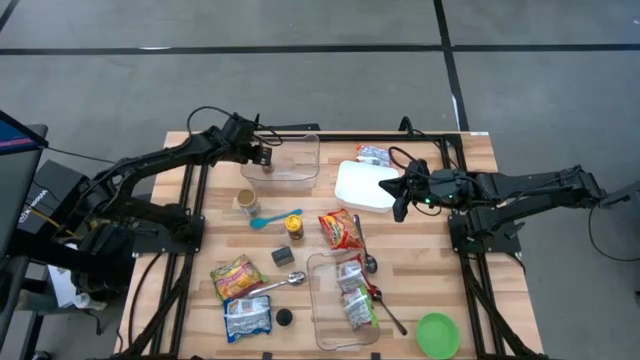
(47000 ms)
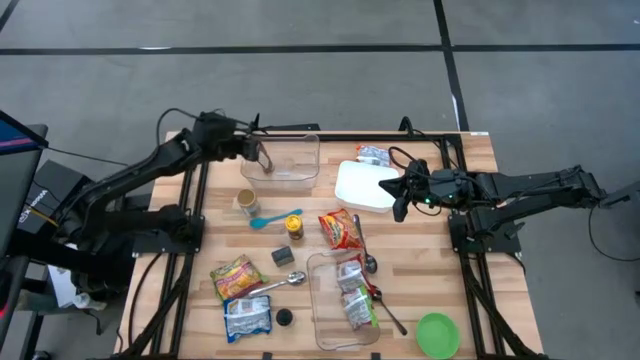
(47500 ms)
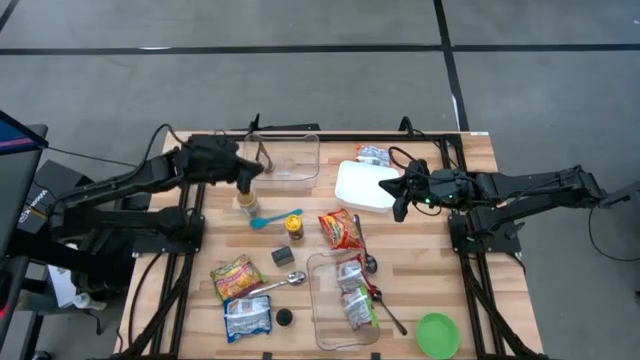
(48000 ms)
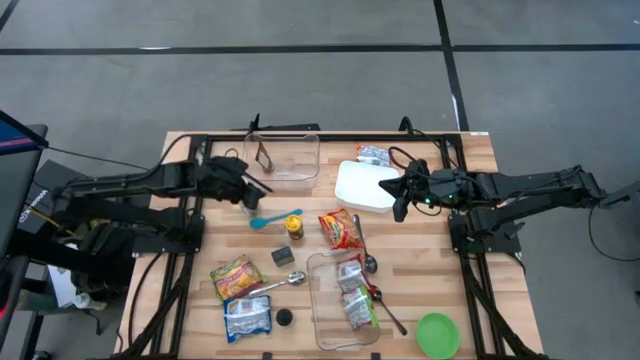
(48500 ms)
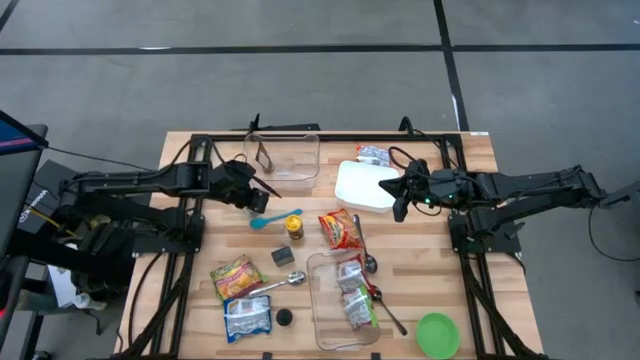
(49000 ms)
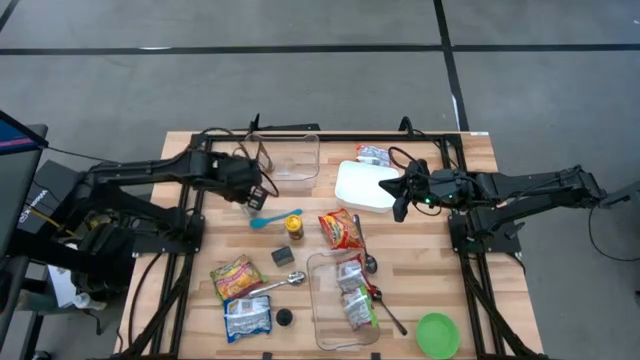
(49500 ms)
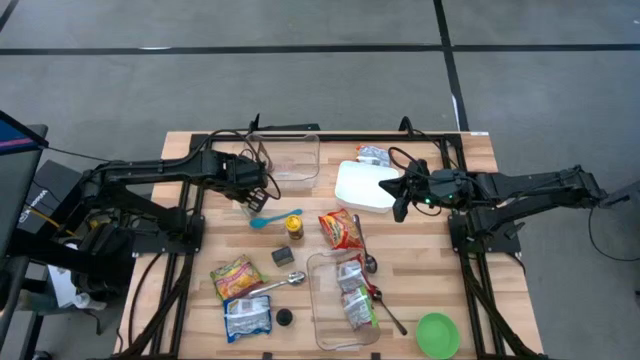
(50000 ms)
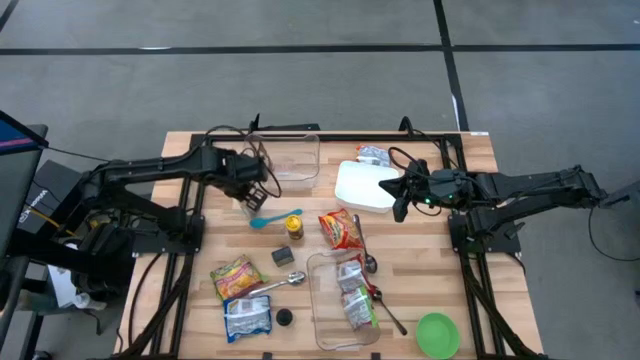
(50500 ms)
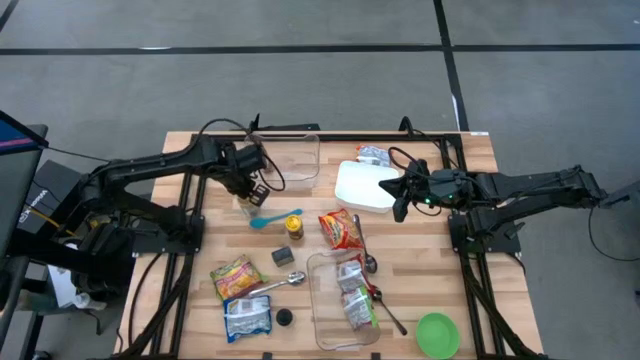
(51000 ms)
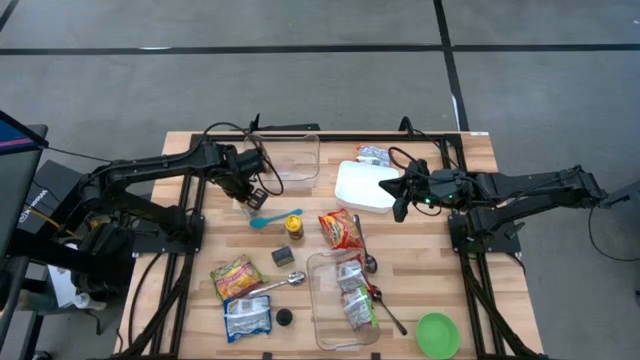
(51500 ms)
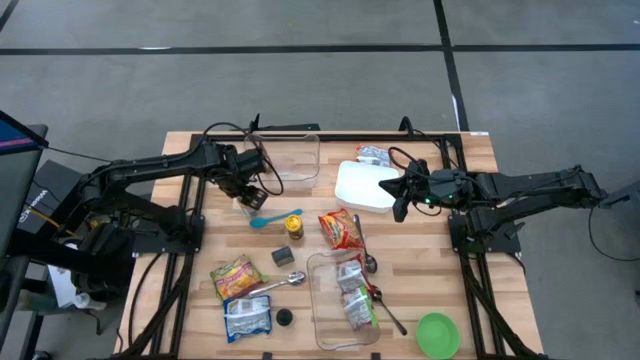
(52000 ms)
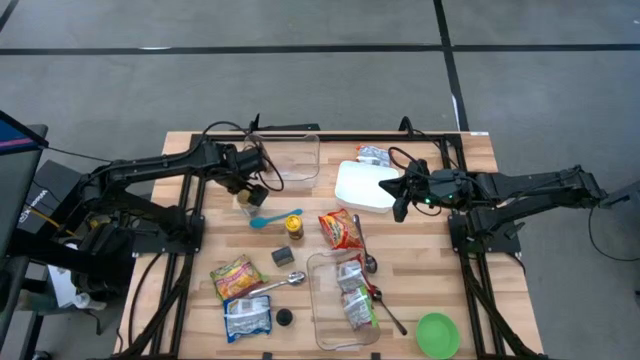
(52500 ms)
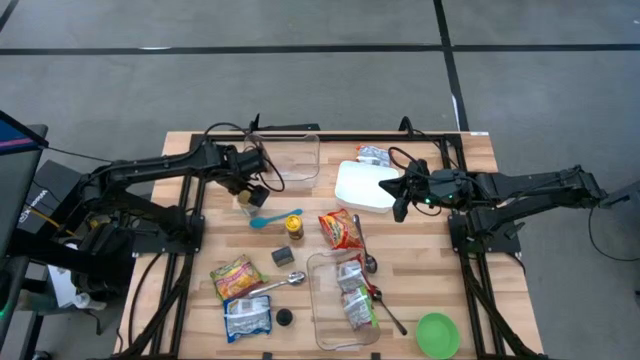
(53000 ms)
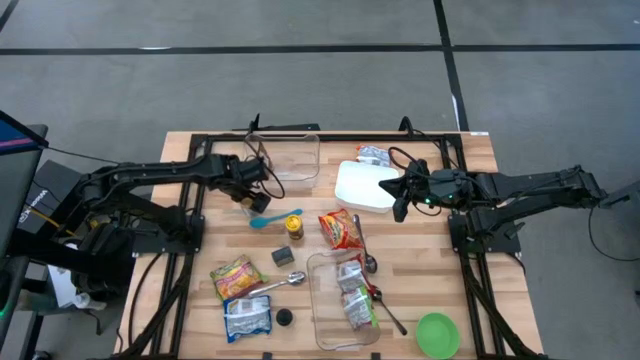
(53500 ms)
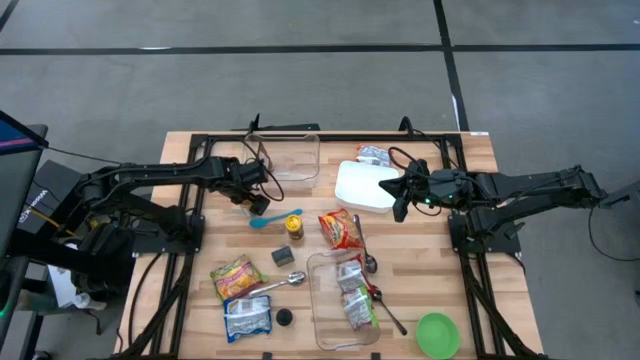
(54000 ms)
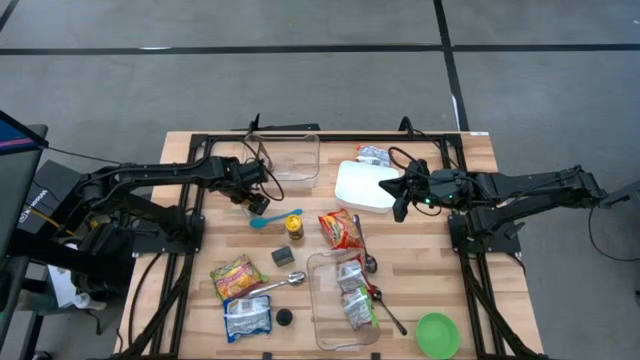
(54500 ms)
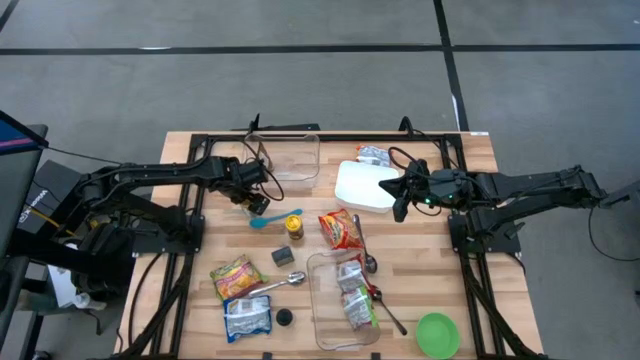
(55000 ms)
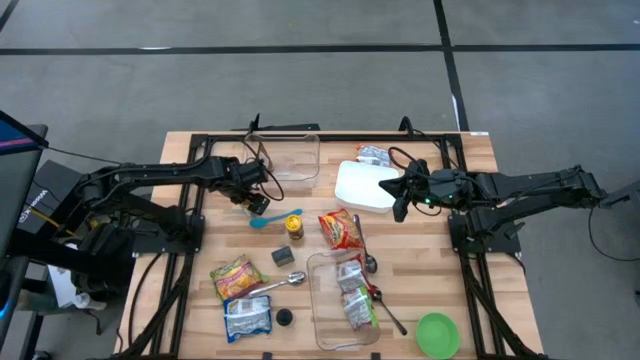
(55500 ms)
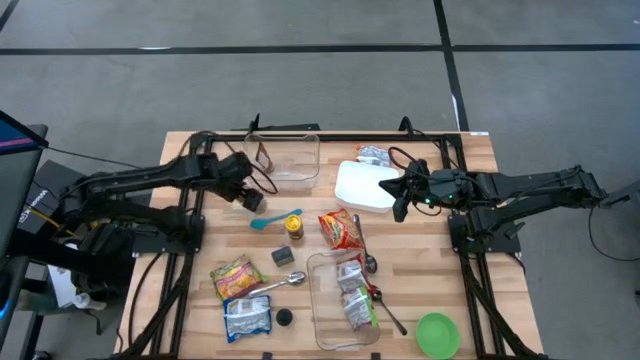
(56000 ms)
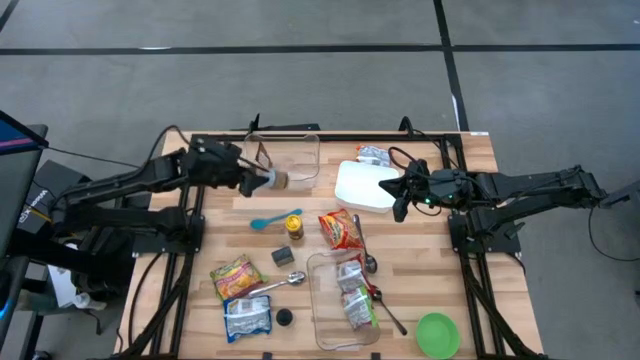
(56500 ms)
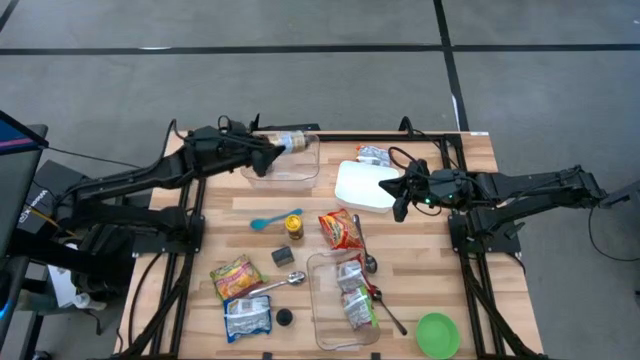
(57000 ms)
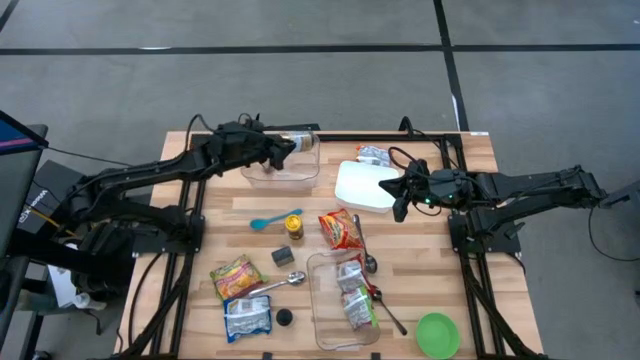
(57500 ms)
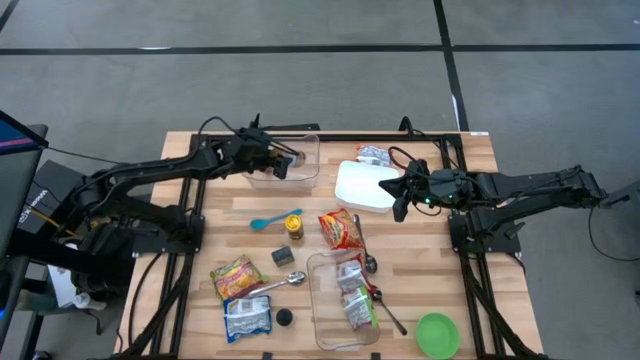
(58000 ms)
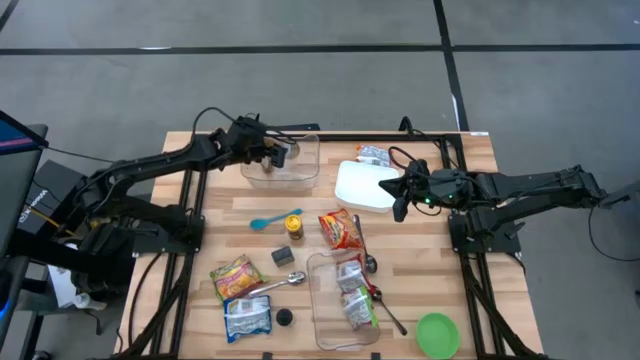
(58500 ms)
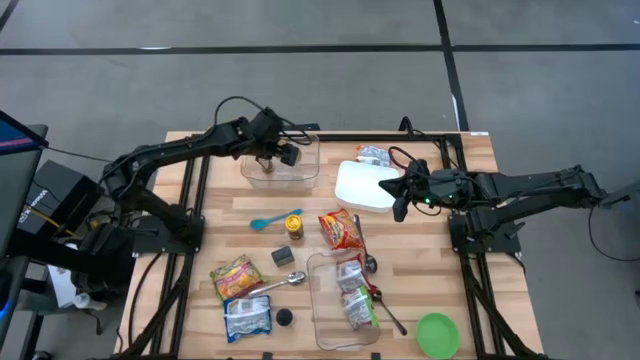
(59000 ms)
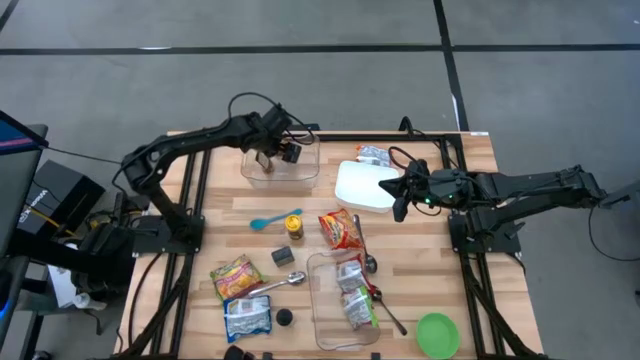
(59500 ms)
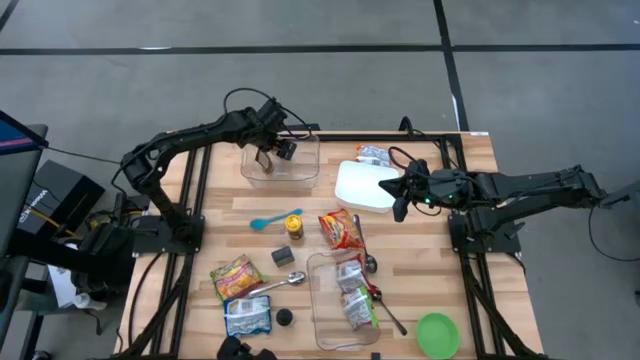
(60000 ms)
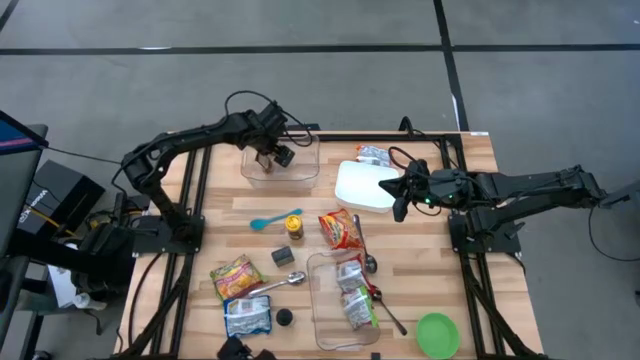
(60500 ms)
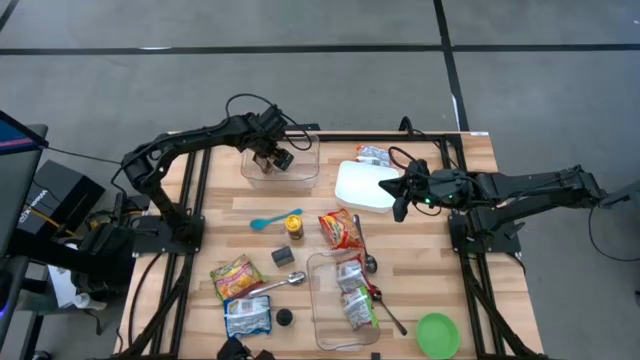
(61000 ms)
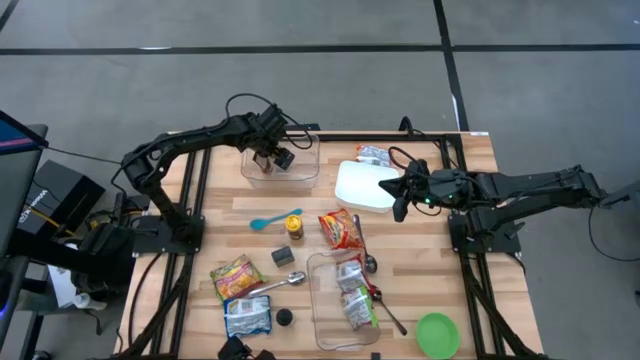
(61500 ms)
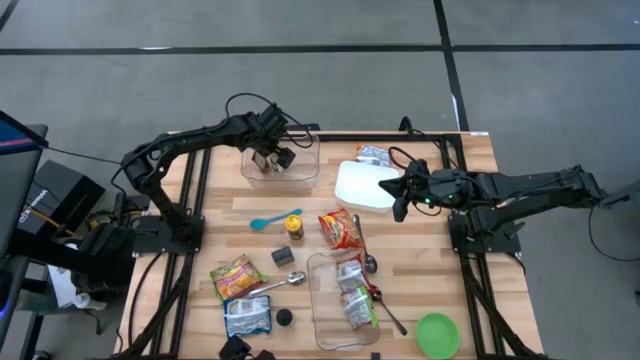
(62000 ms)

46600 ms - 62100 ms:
Task: Pick & Place Food Item
Put the gold seasoning bottle into the top transparent bin

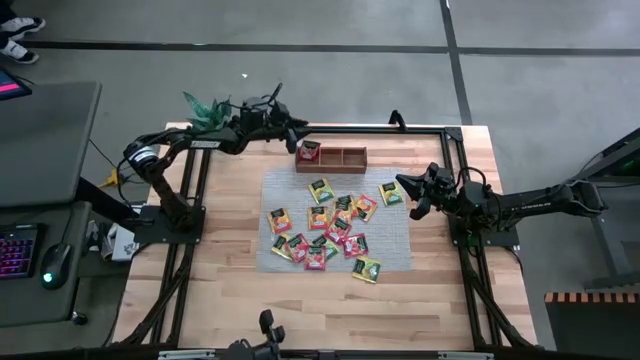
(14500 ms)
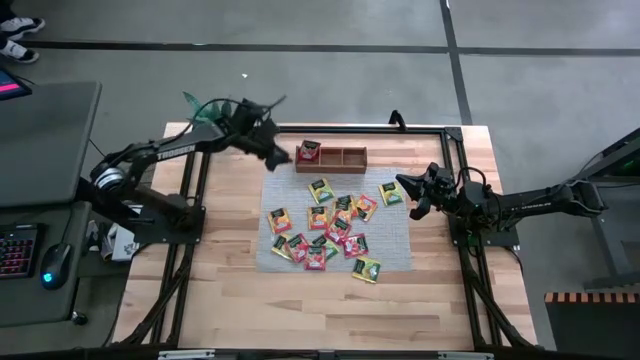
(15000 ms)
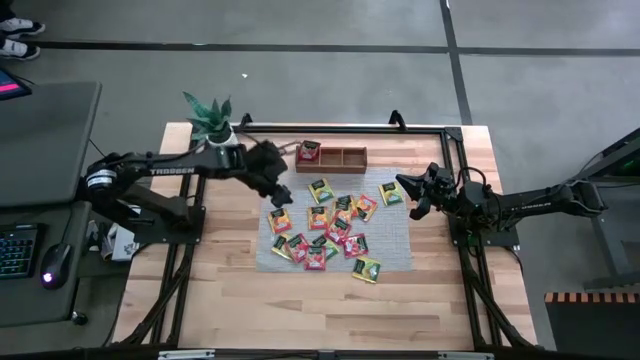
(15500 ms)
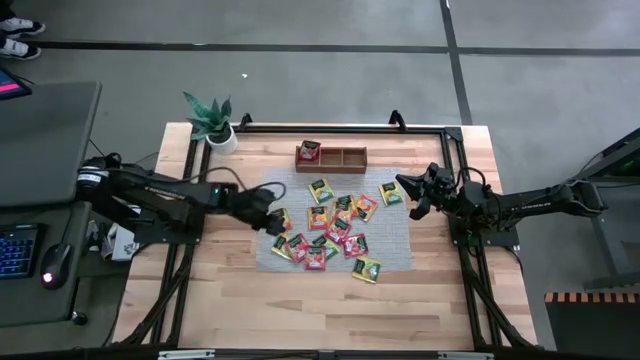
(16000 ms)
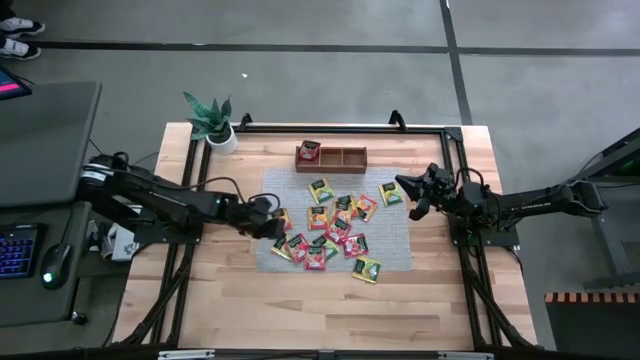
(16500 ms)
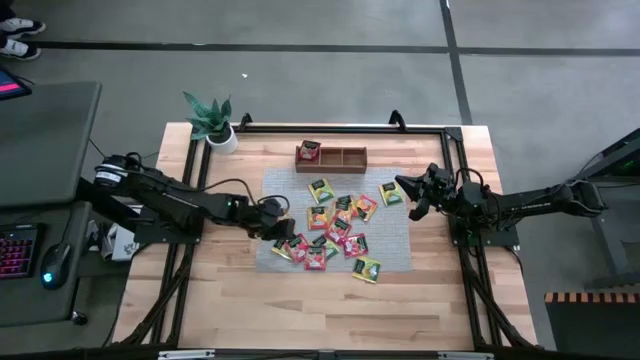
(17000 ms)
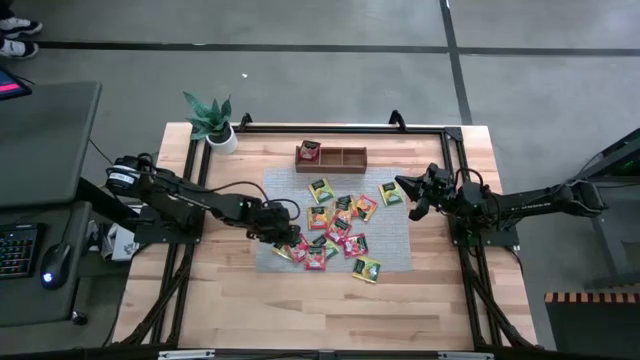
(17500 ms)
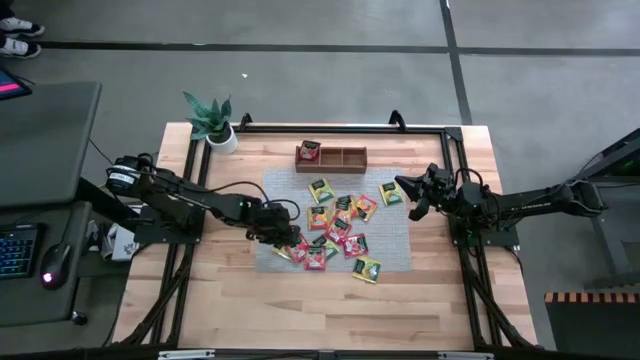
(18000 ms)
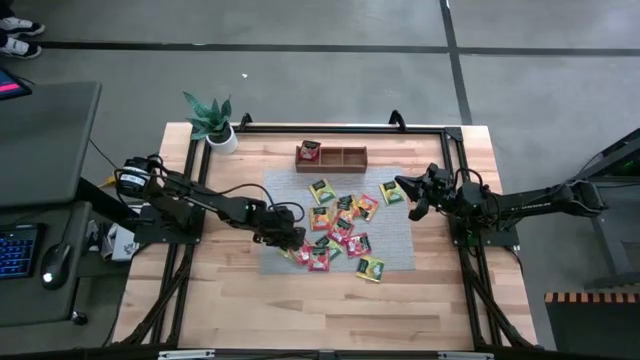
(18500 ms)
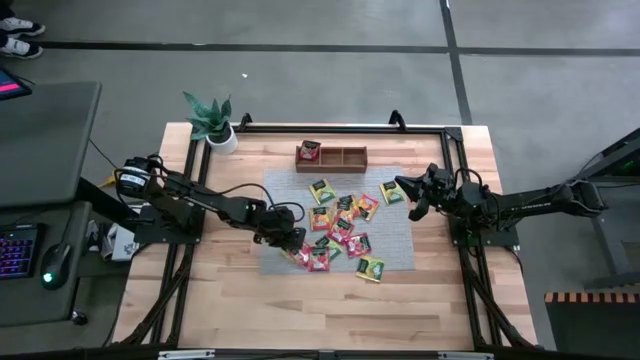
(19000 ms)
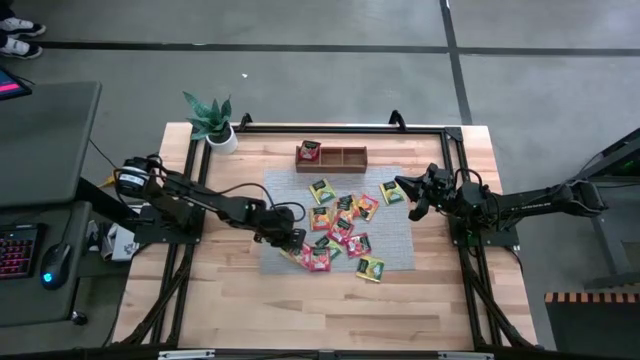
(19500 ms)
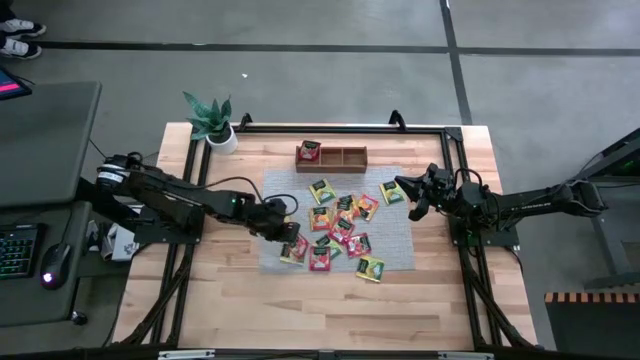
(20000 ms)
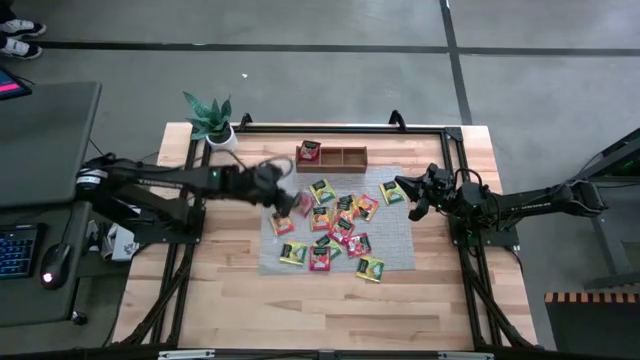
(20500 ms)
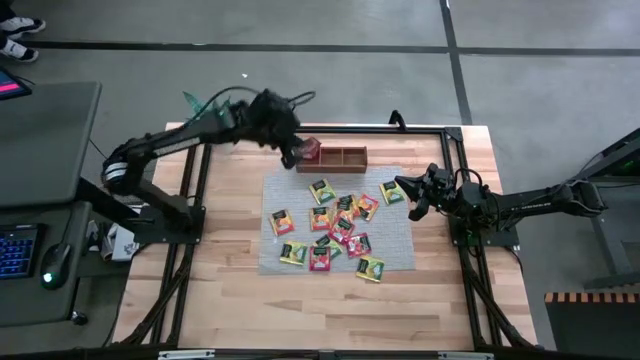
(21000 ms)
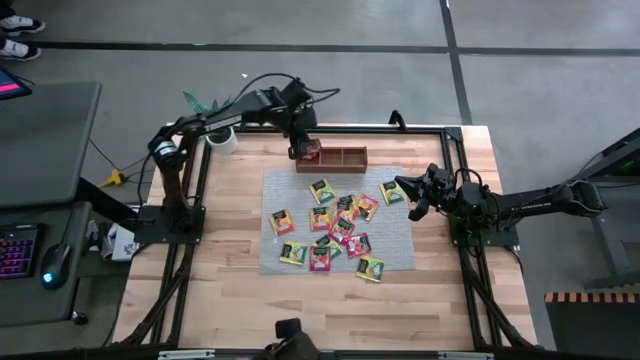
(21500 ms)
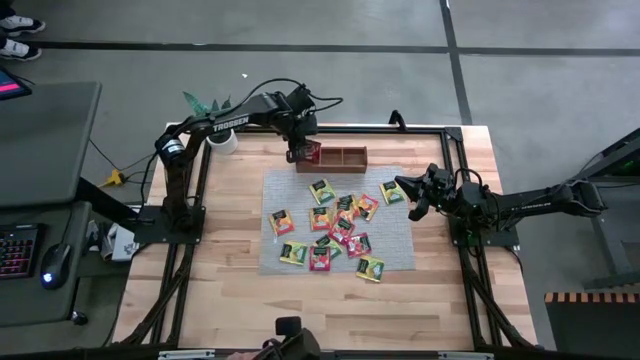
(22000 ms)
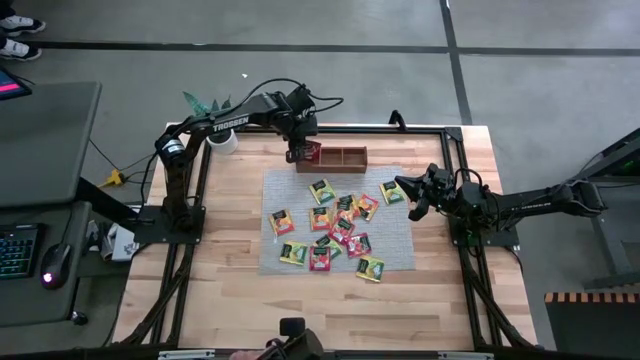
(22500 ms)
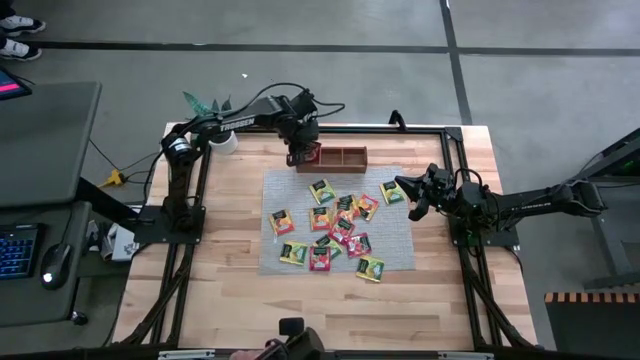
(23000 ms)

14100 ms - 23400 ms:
Task: Pick & Place Tea
Put the red tea bag into the left section of the wooden organizer
